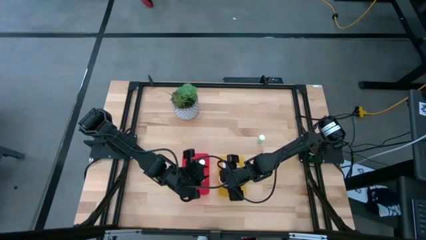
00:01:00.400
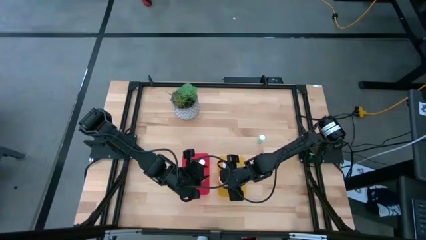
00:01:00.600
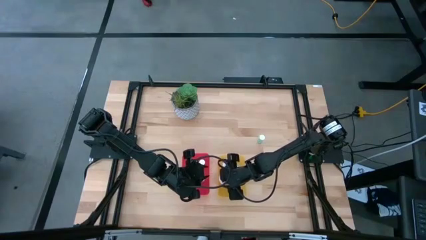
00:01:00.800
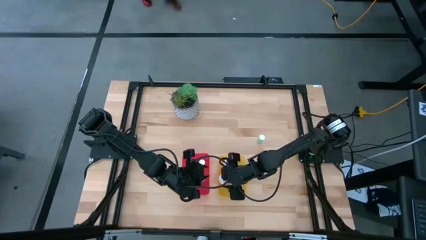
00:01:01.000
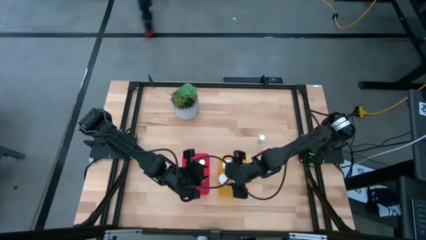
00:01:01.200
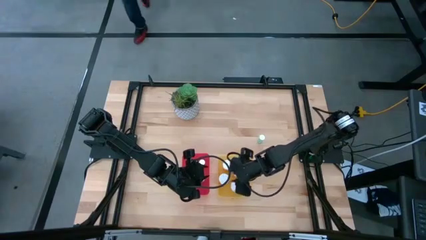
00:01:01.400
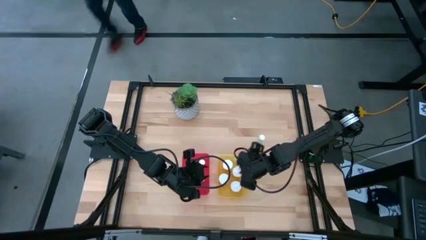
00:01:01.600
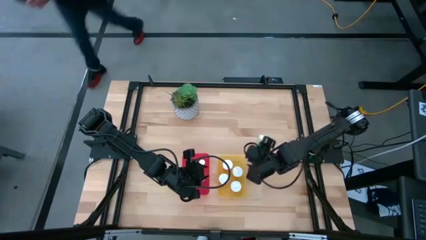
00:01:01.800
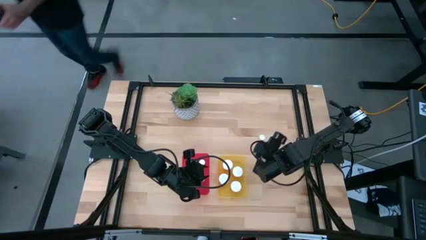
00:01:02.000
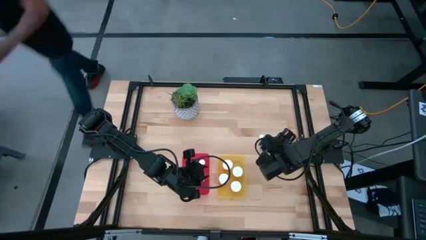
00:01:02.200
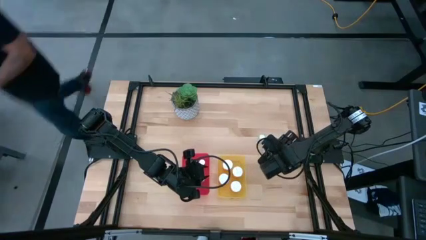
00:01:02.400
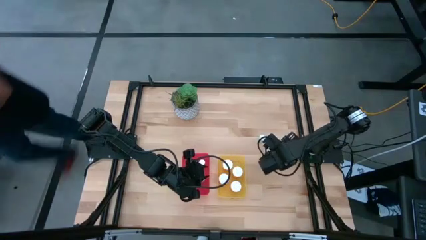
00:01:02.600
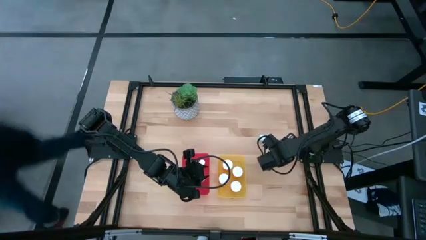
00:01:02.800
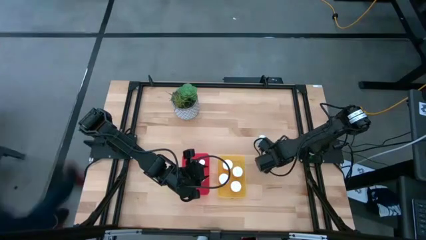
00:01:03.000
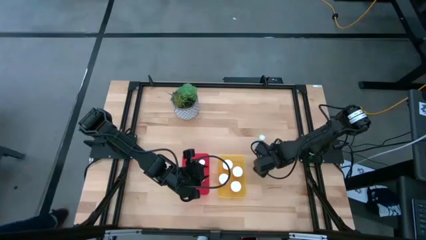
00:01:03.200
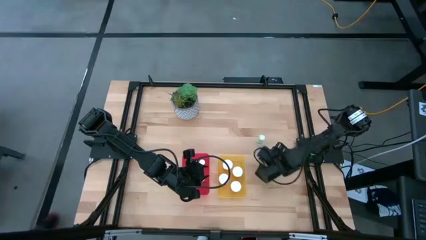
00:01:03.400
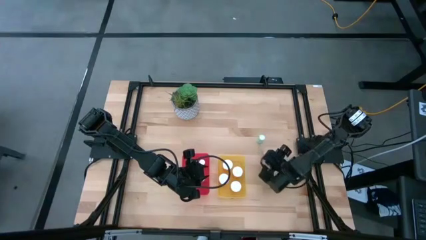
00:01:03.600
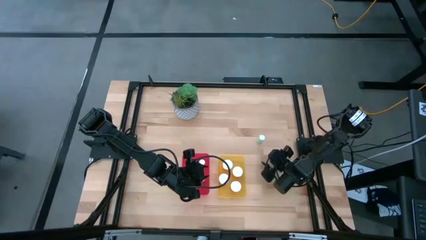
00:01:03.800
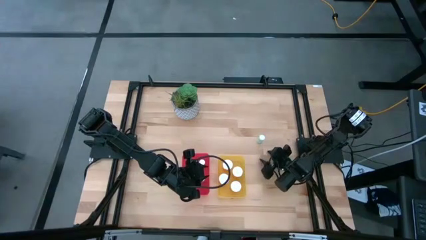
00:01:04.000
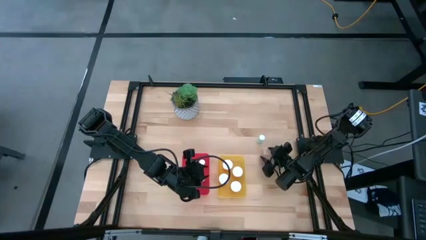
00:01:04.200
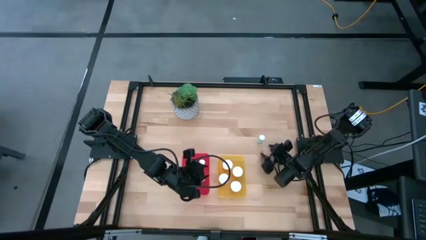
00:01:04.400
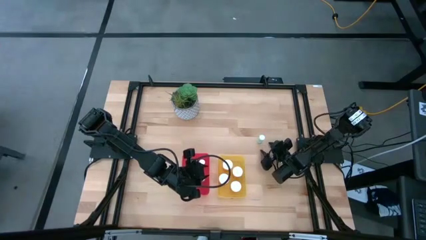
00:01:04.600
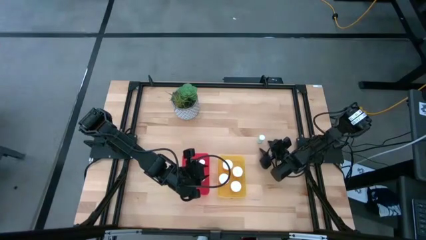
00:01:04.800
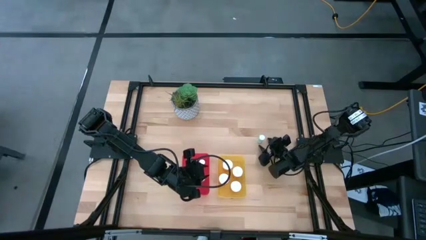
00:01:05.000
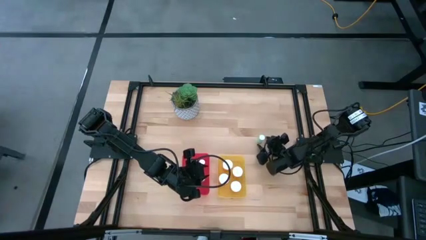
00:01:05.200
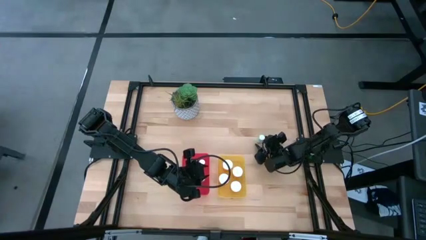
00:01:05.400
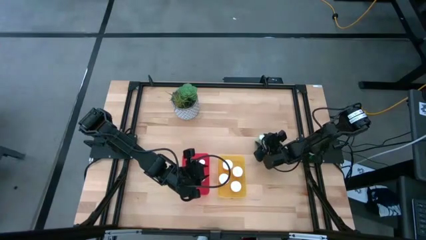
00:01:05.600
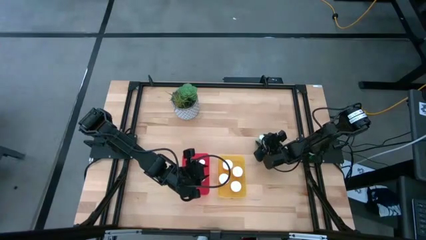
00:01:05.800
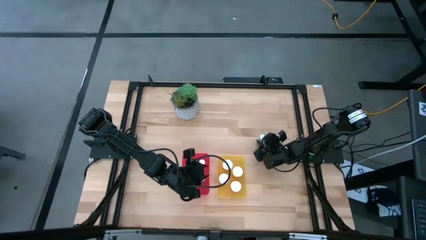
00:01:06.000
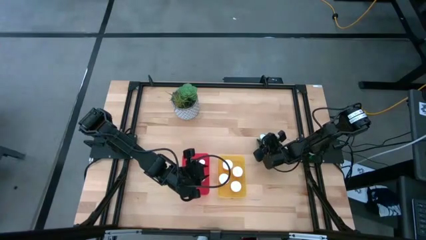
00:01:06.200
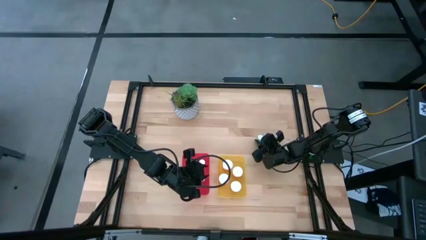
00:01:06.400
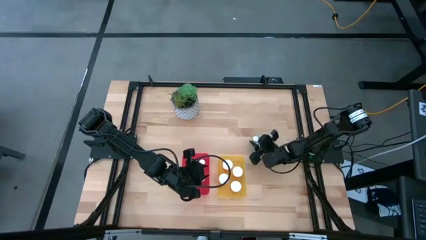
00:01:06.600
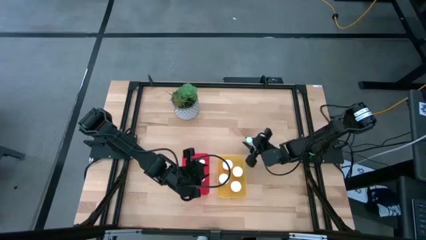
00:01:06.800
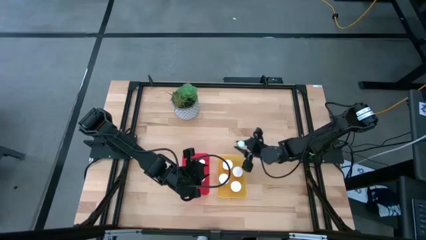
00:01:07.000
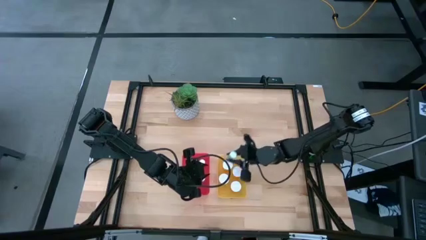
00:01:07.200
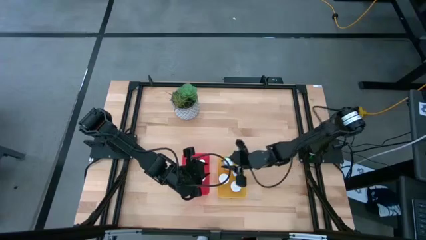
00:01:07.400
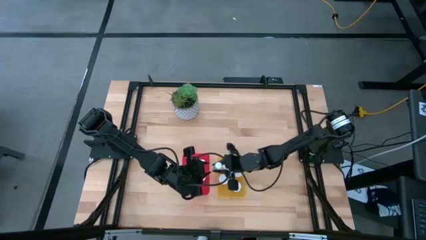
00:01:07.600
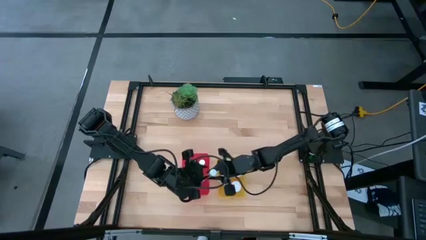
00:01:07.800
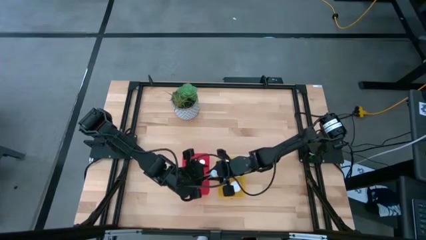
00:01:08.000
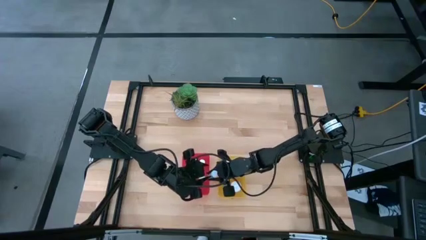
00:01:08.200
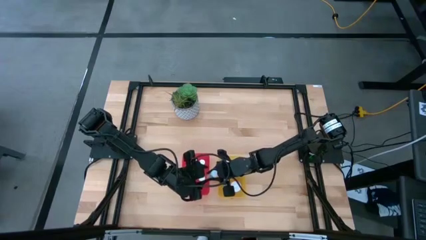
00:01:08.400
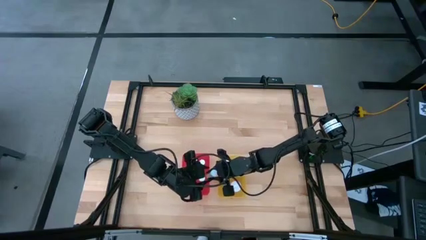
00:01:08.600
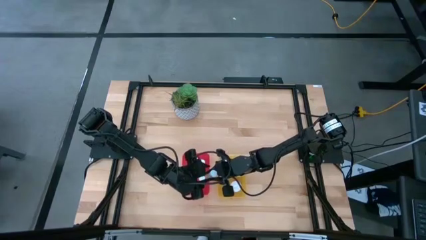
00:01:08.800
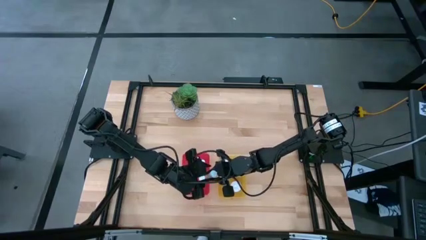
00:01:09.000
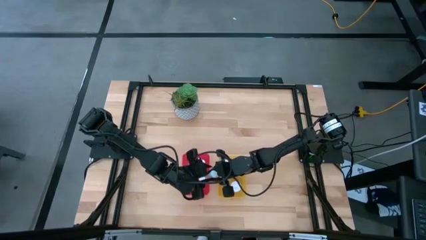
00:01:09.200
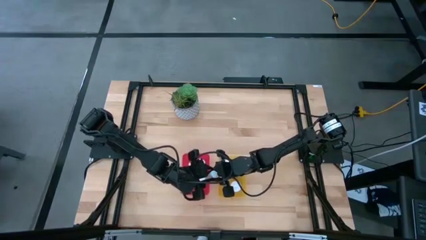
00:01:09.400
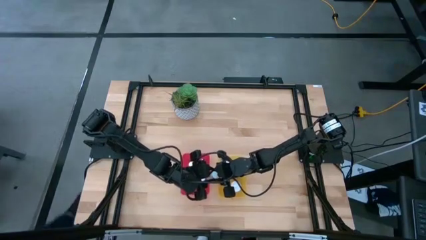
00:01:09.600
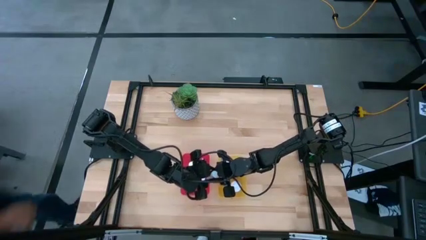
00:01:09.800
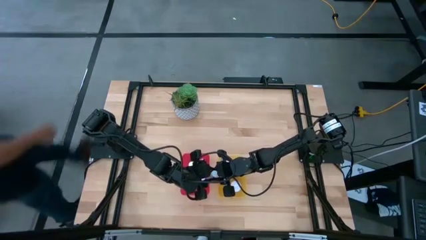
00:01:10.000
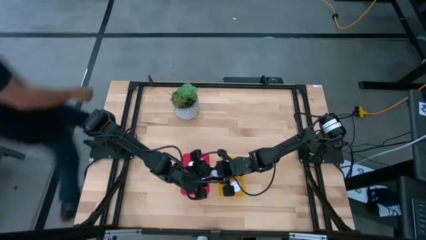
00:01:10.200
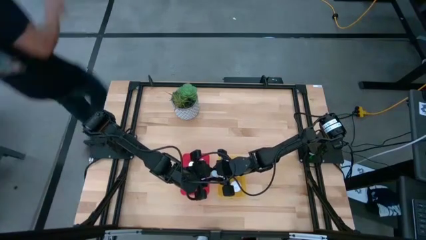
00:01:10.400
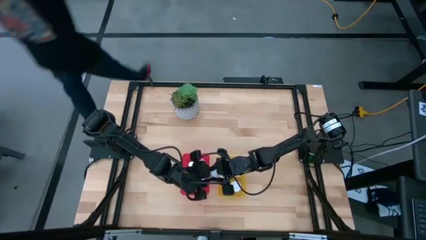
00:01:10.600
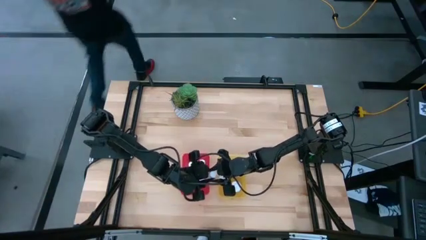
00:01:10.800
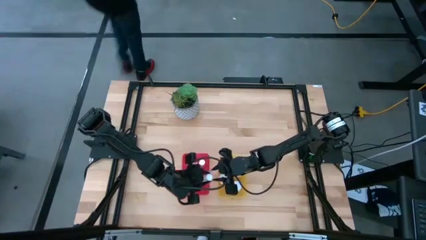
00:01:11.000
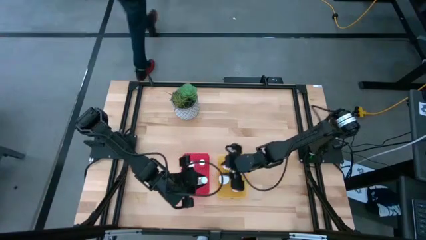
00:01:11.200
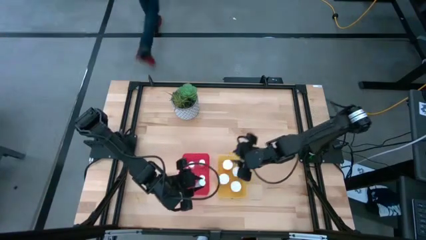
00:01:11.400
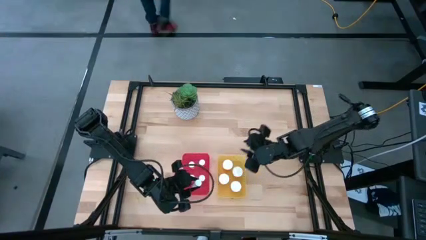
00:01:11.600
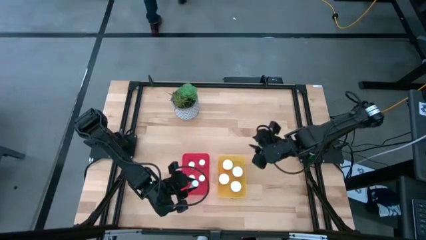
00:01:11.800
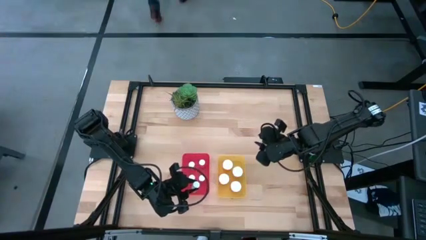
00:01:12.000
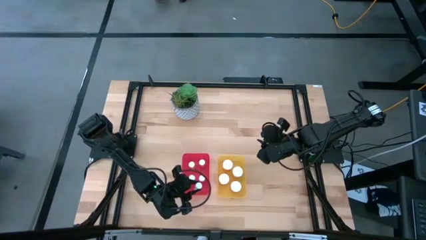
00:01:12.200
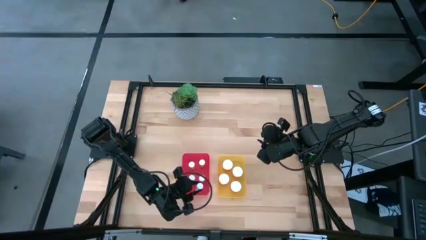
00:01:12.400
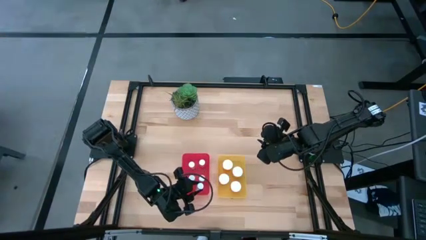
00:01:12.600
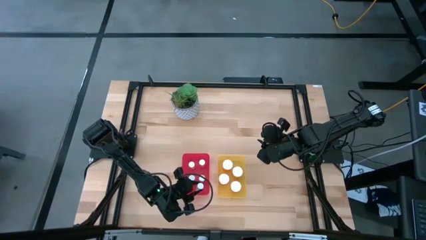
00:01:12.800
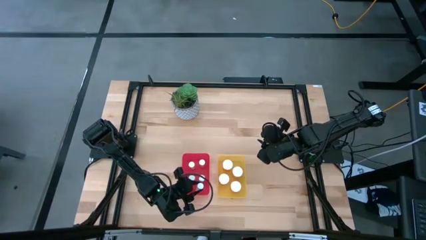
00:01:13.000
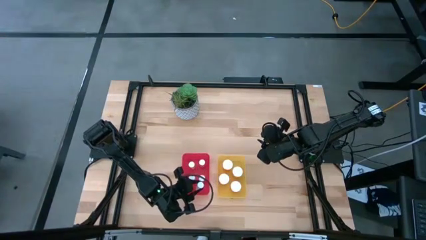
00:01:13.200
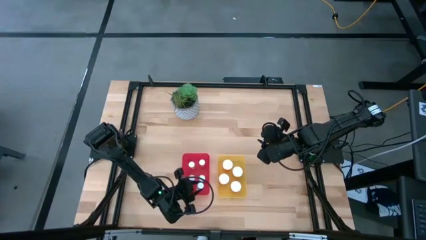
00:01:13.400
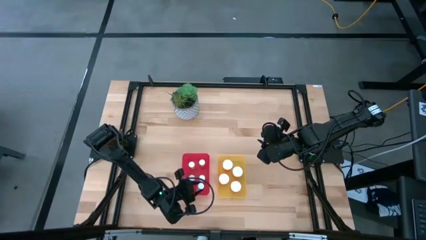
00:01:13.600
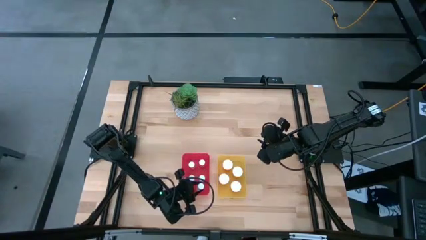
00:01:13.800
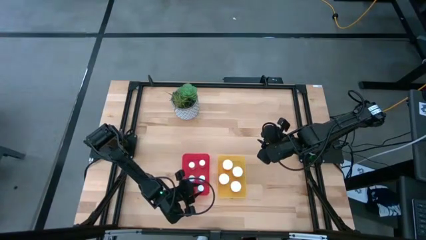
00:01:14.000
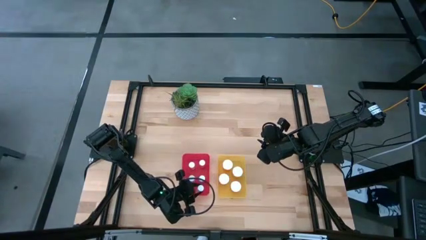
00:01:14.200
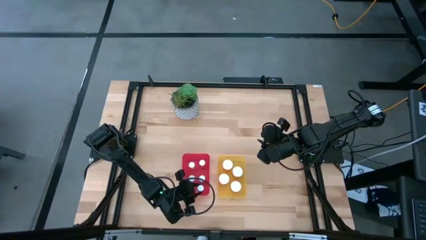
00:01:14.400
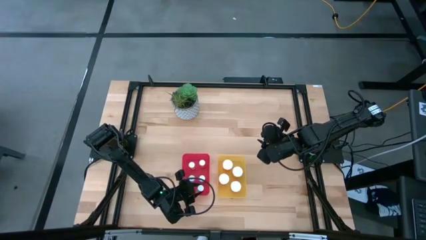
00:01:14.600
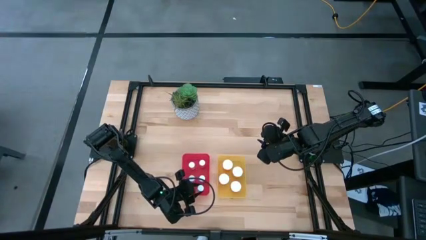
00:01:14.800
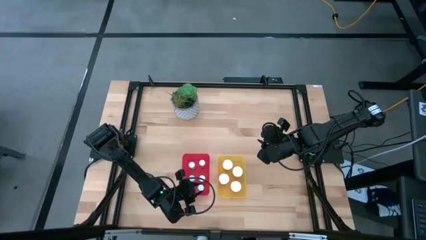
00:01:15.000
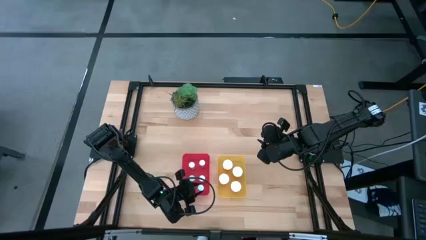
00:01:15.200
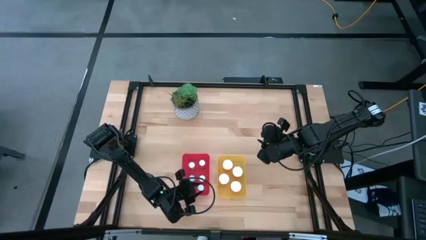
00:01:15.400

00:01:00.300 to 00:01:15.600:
Task: Pick and place medicine bottles into bin by pill shape (circle, oval)
Put the blue tablet bottle into the red bin

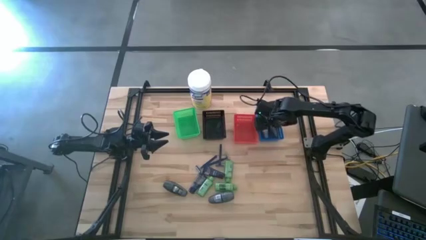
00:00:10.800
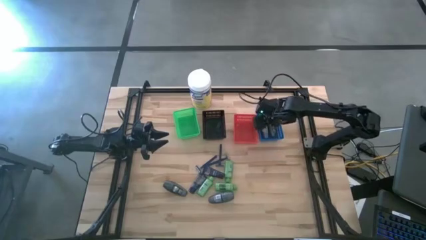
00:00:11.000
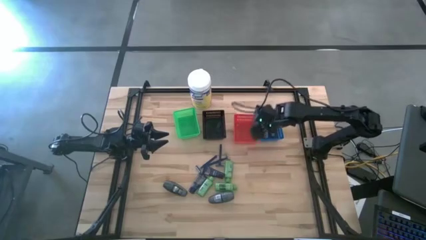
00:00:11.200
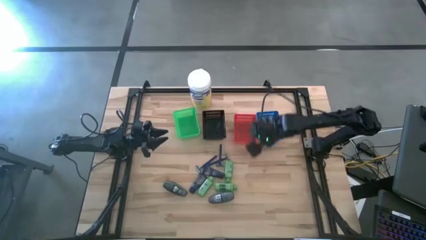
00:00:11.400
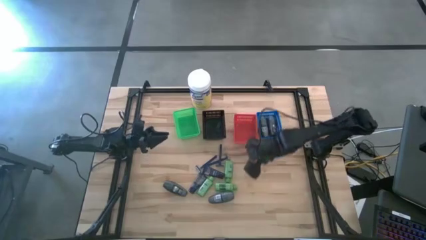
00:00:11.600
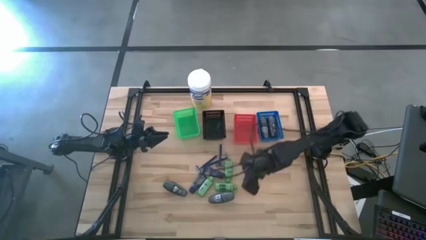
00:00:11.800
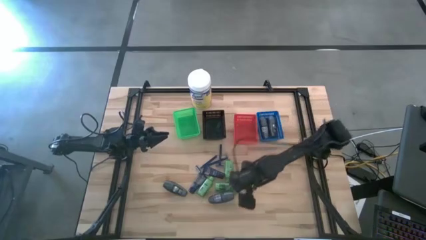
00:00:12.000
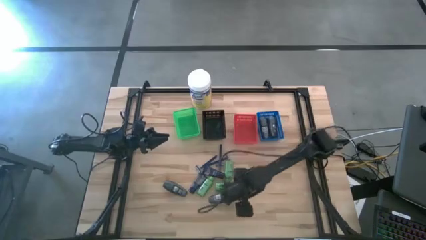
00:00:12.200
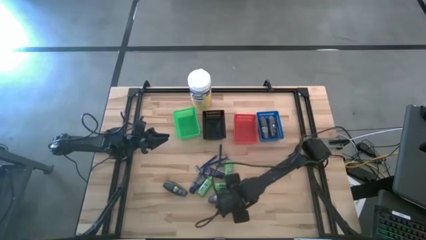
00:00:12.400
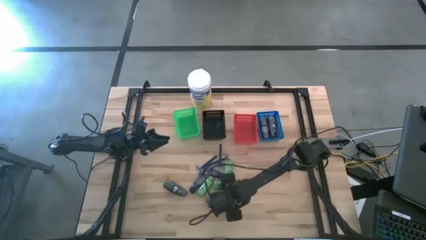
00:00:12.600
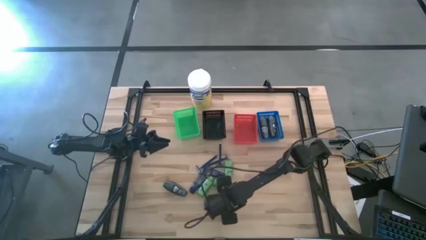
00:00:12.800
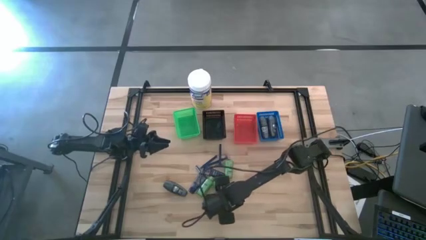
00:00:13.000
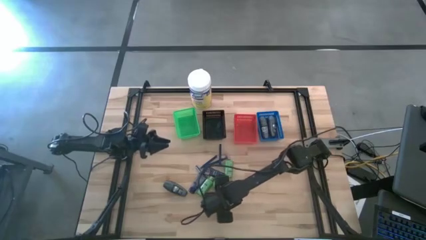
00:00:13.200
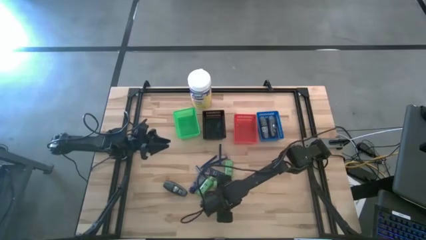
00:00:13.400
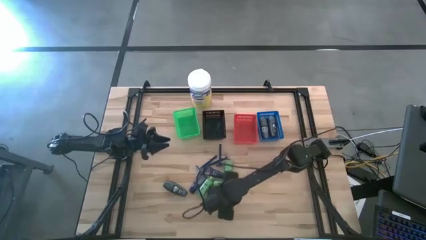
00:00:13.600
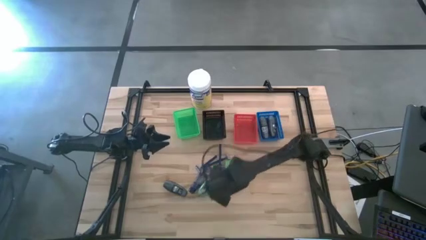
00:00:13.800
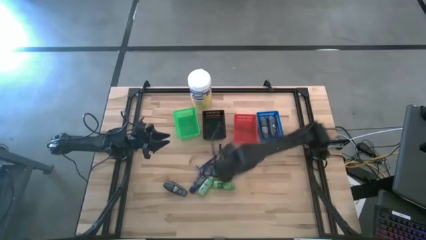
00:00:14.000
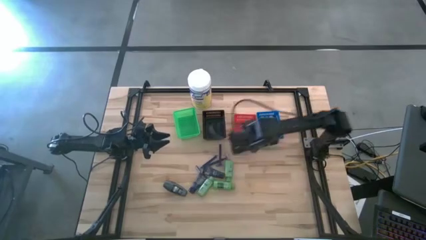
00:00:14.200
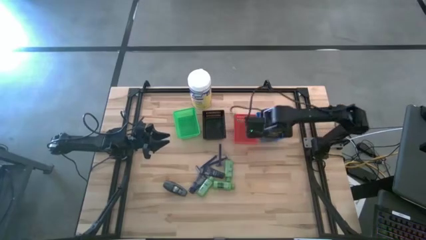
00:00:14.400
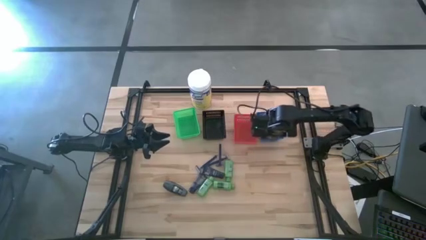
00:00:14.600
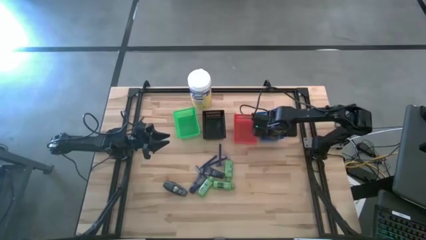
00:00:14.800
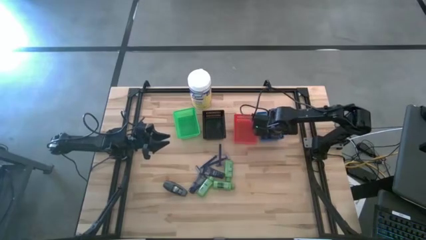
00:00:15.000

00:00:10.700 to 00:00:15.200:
Task: Pick & Place Travel size toiletries
Put the black deodorant into the blue bin
